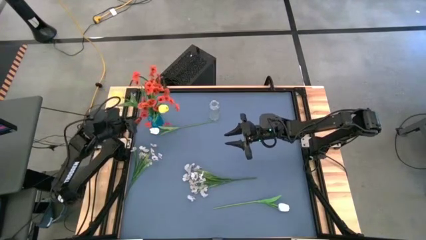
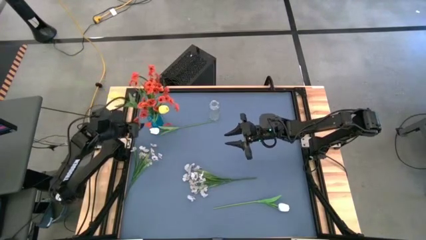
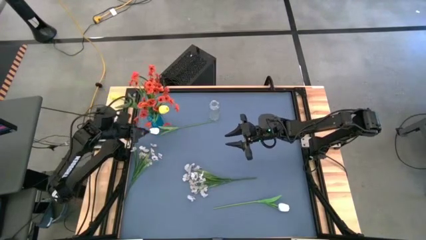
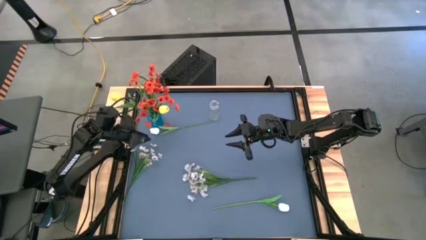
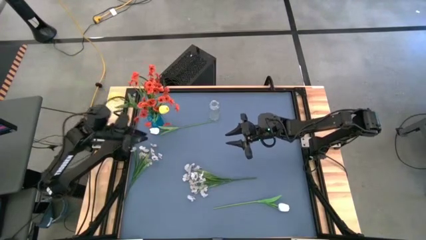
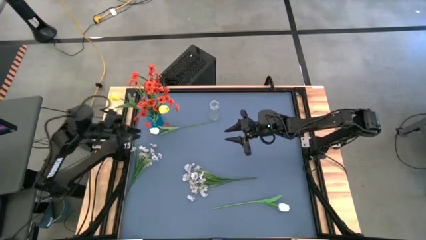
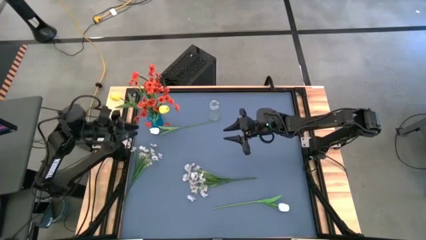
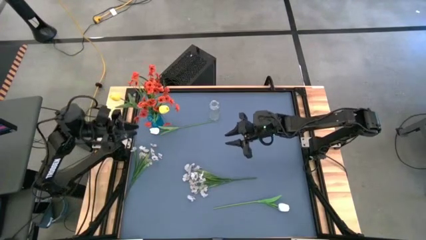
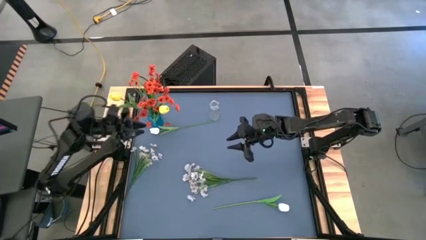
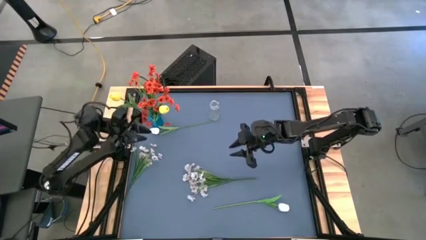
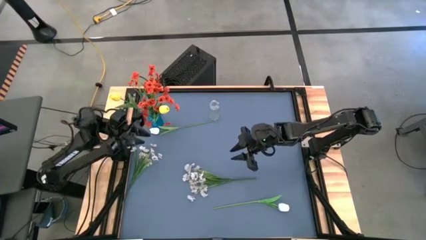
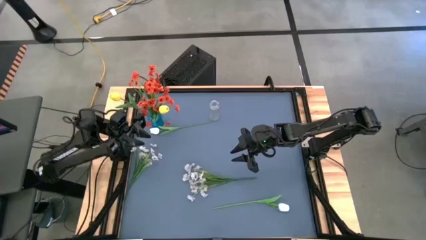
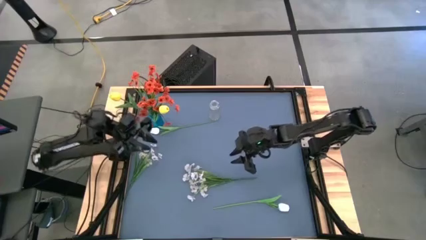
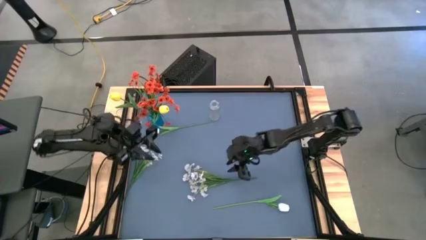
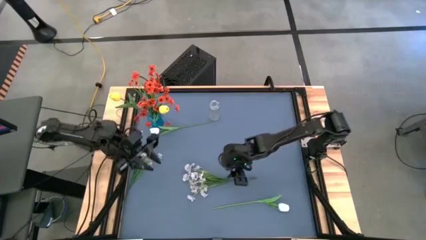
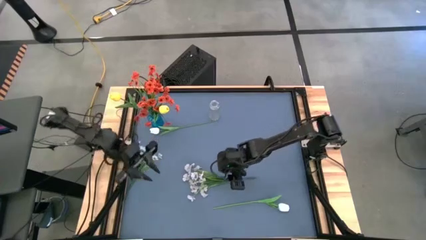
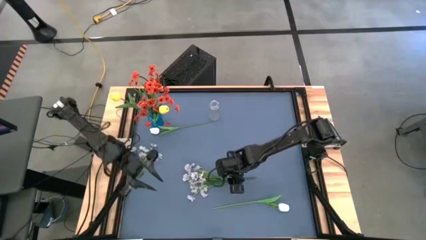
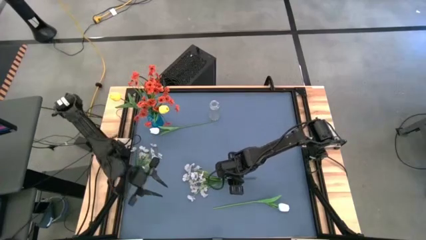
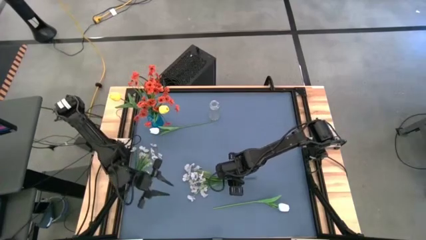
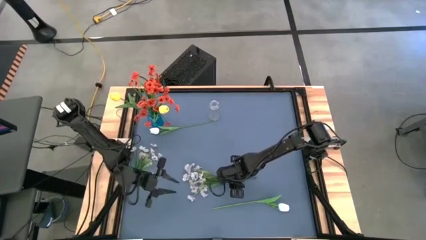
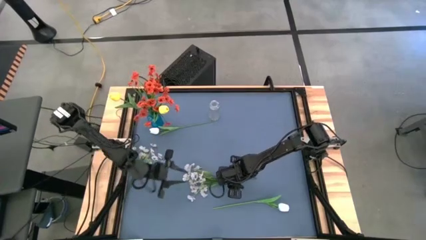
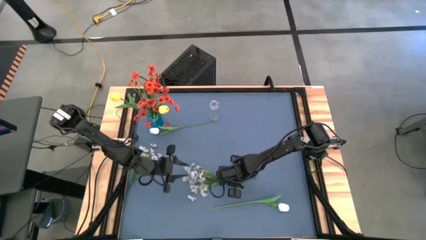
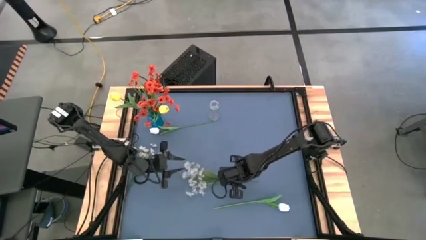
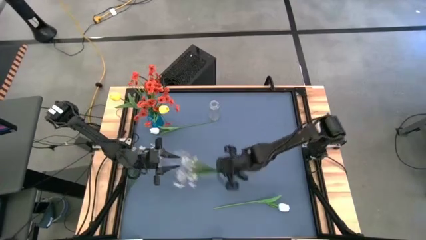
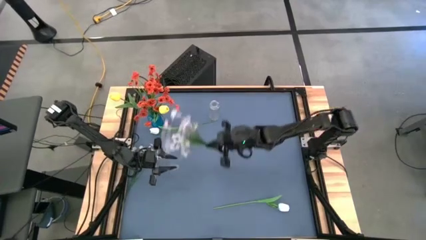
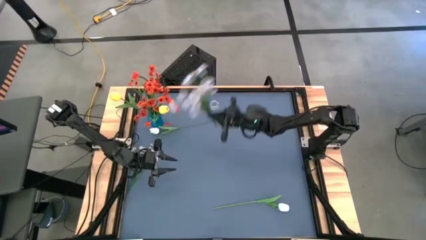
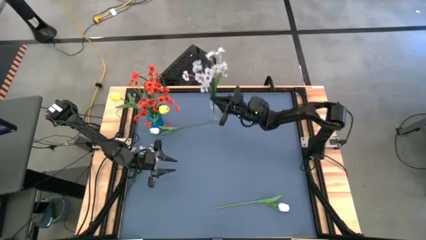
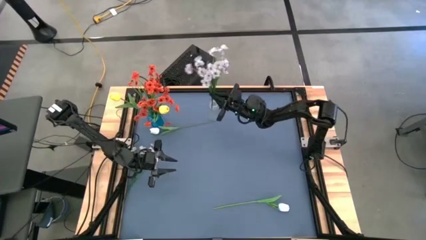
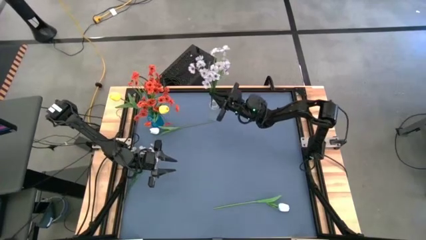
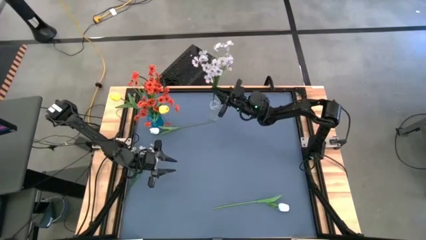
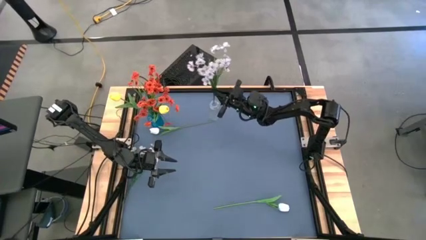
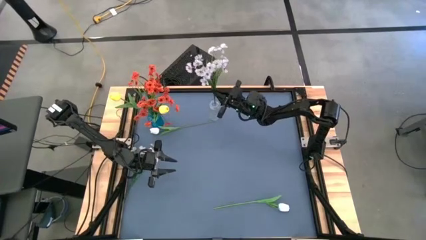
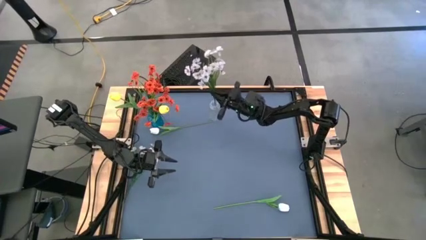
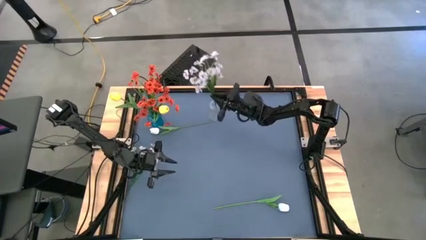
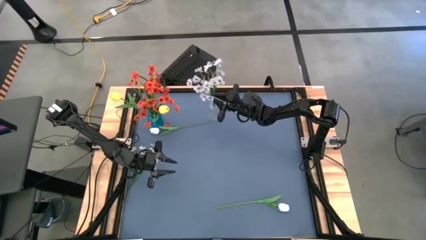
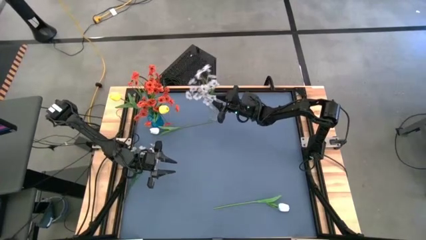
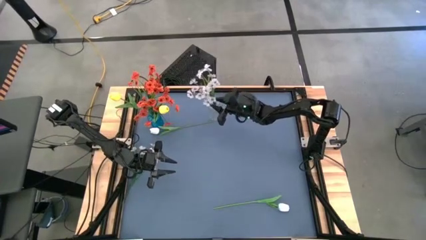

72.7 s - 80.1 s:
Task: Sort flowers into vase by color
Put the right white flowers into the transparent vase

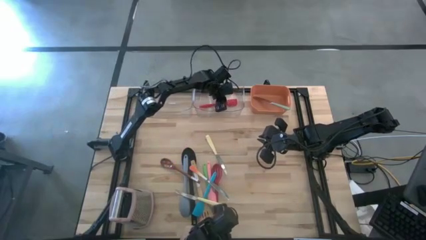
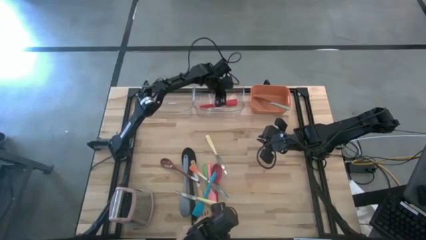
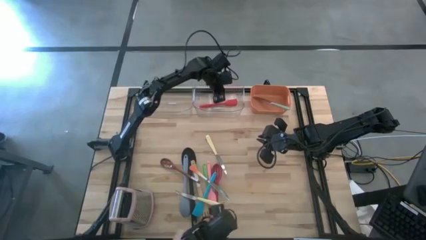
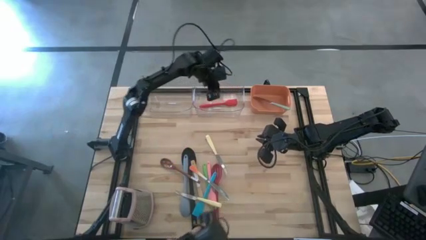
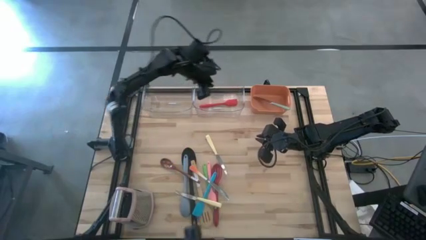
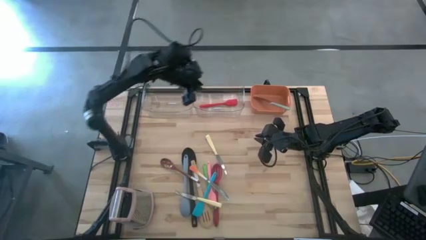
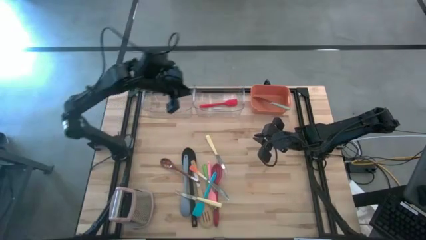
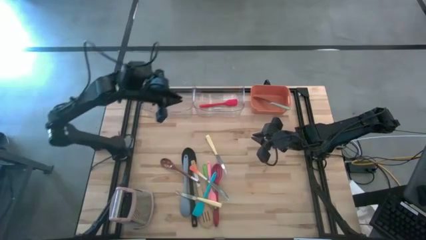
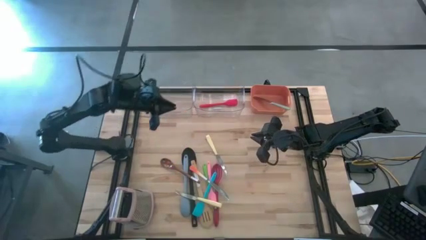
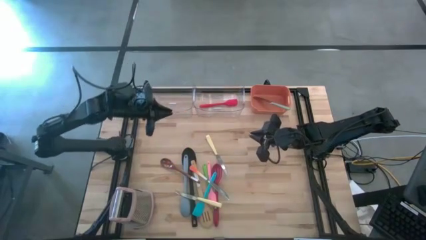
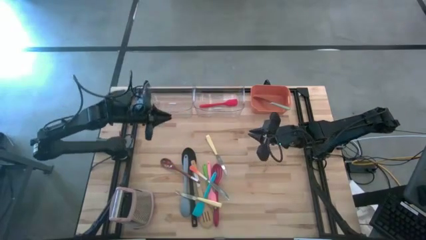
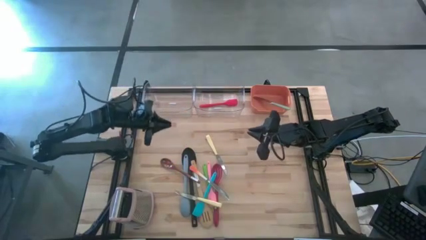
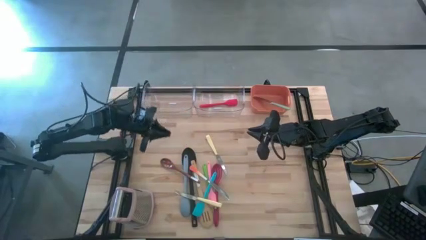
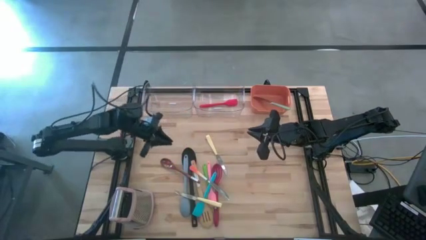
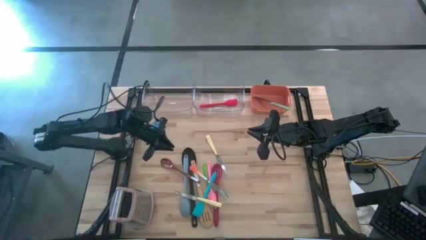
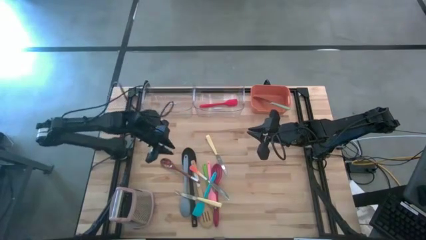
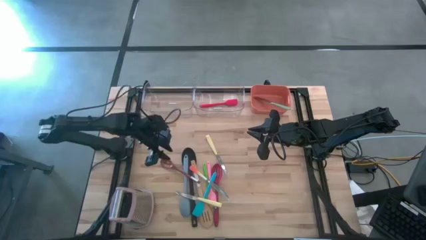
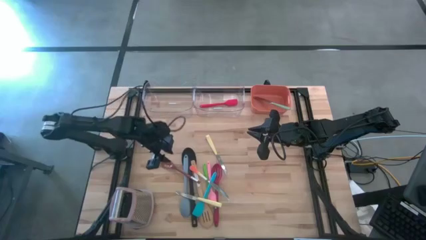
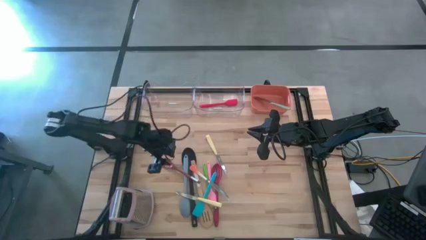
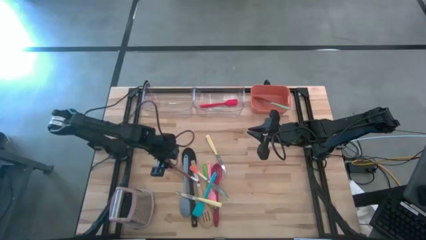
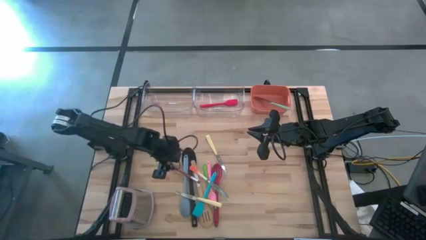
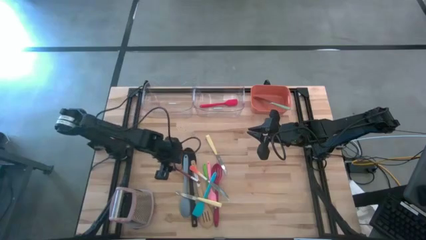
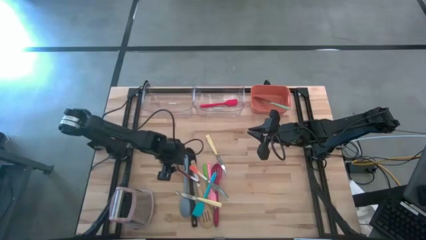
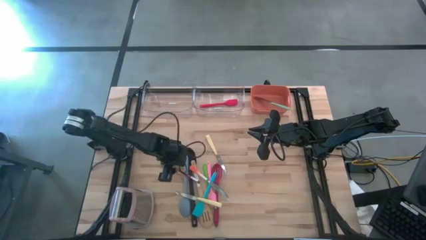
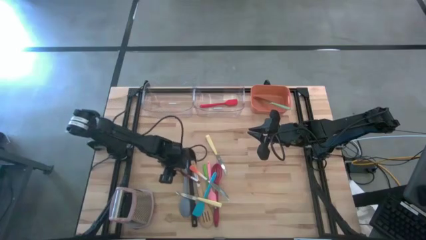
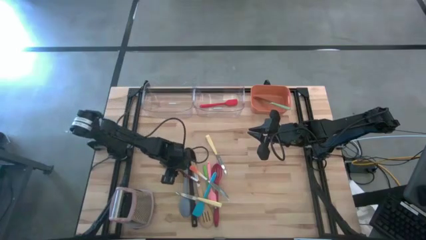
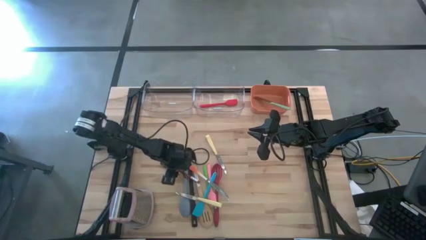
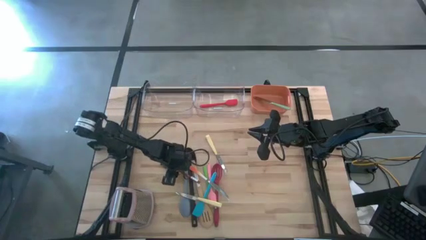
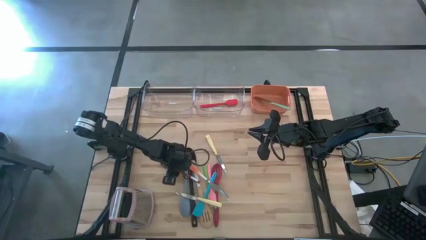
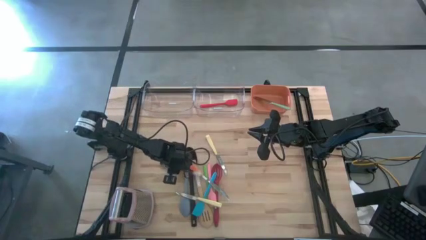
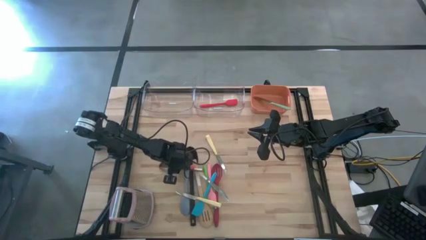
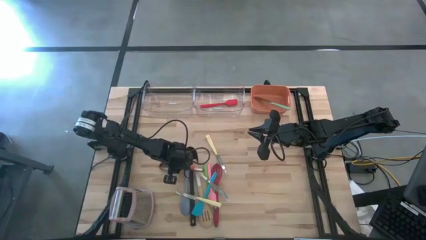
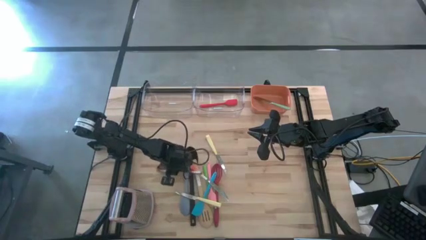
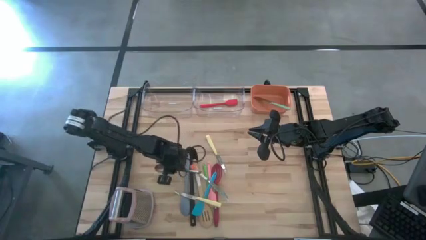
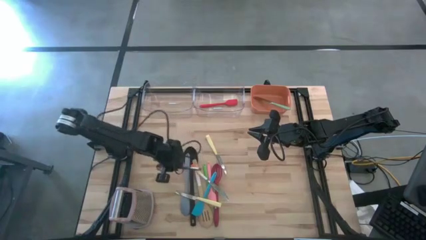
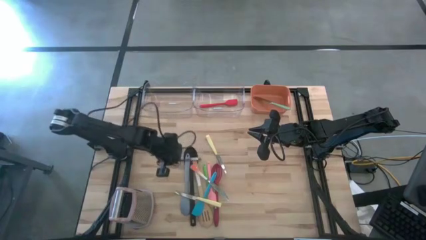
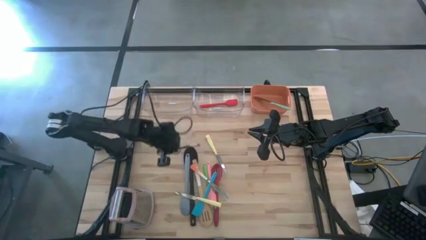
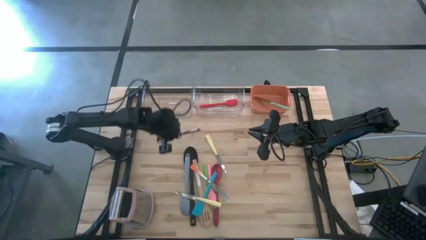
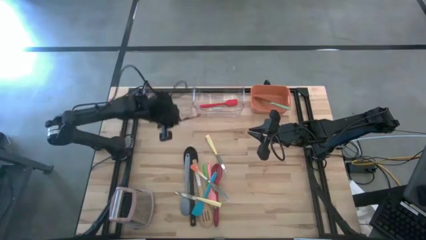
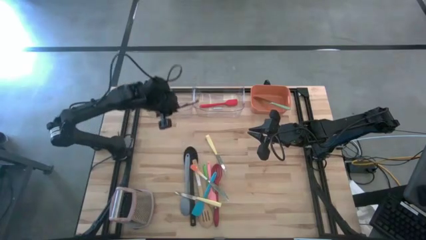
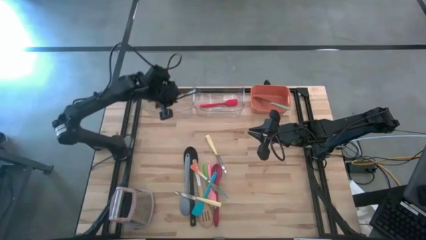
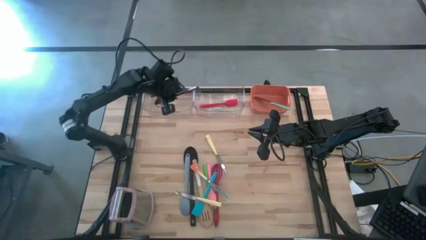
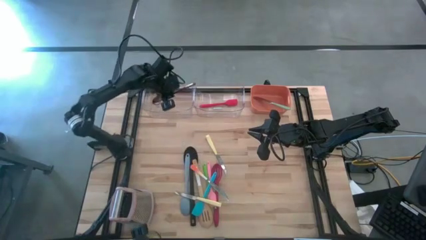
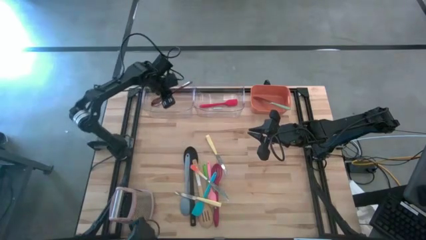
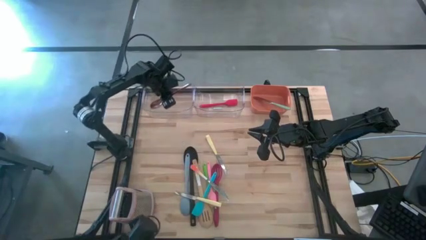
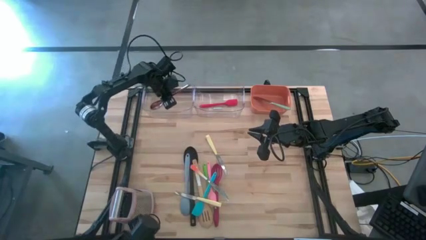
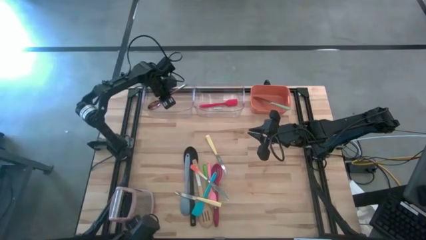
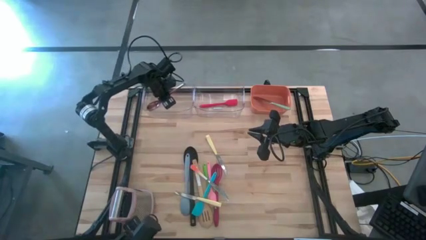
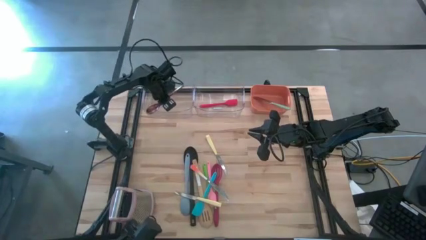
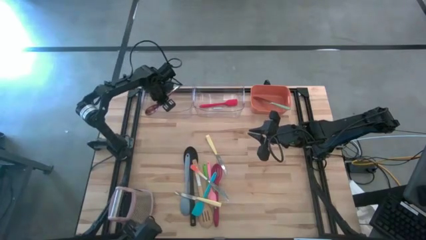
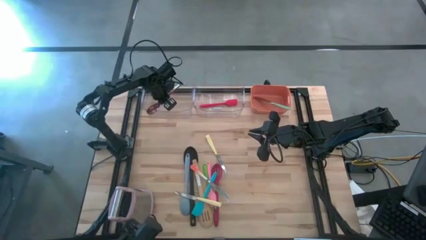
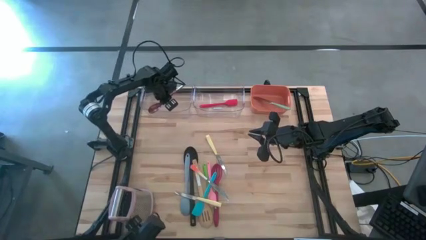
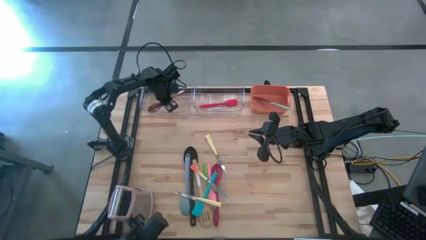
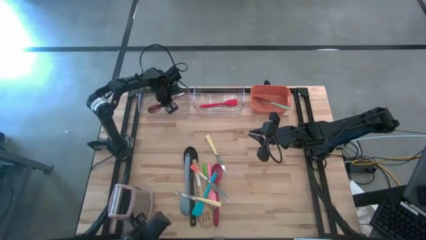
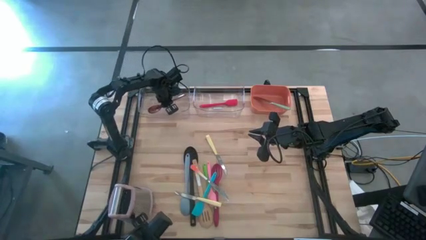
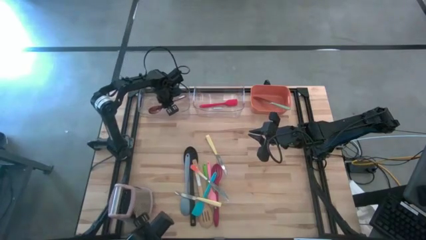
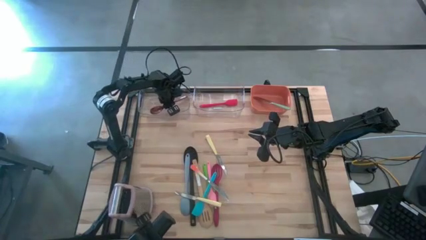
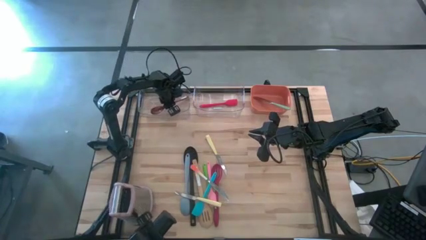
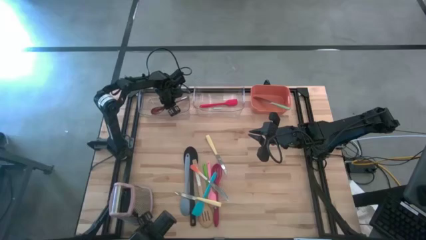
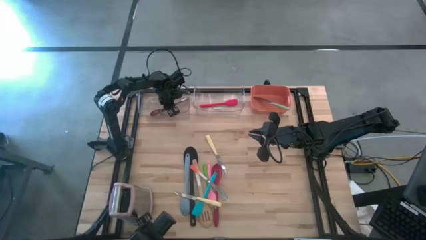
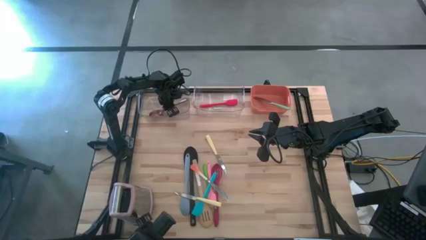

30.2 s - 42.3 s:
Task: Pick & Place Kitchen Items
Put the brown serving spoon into the left transparent bin
